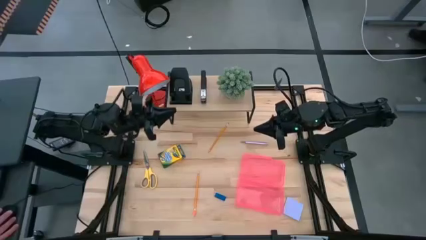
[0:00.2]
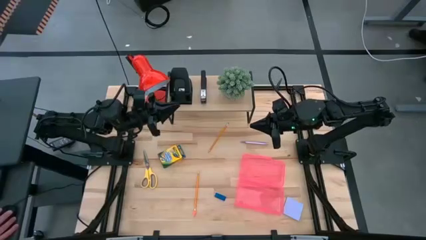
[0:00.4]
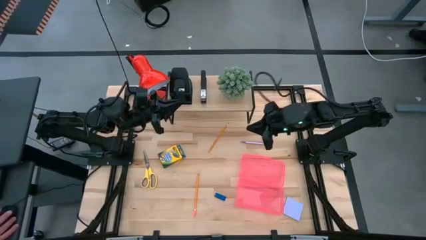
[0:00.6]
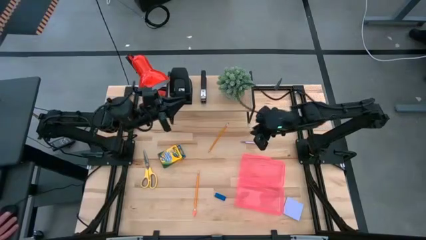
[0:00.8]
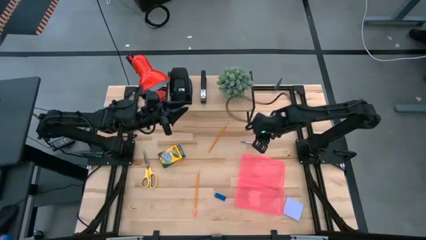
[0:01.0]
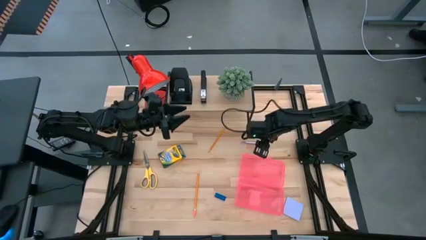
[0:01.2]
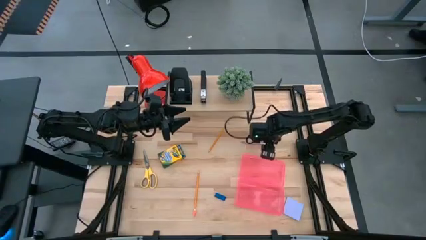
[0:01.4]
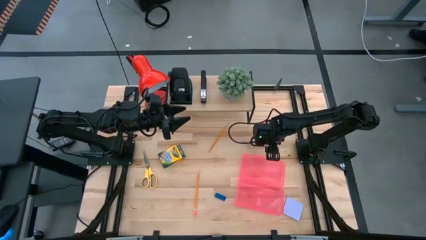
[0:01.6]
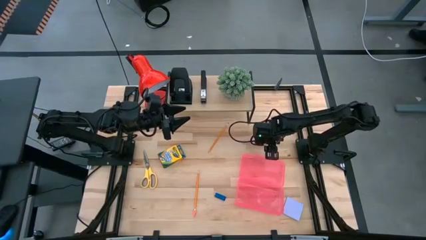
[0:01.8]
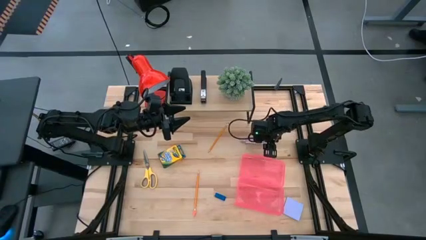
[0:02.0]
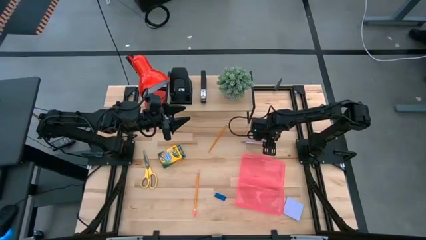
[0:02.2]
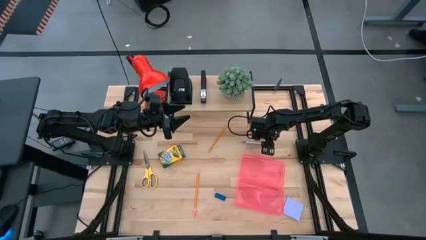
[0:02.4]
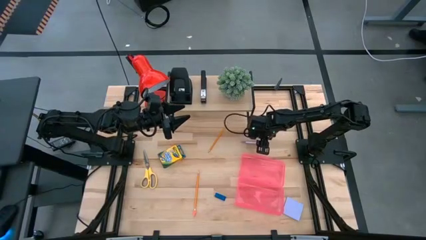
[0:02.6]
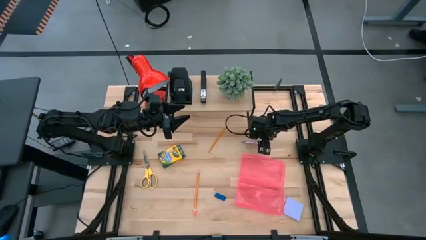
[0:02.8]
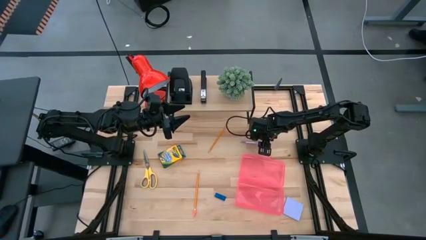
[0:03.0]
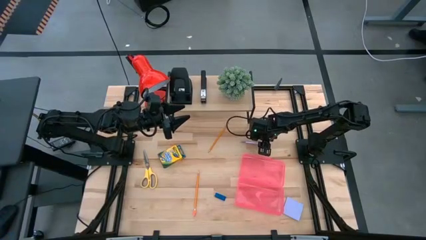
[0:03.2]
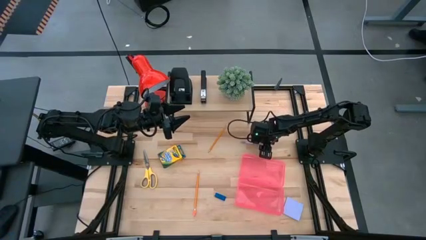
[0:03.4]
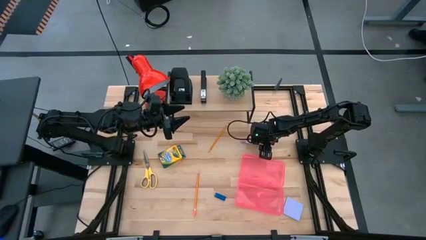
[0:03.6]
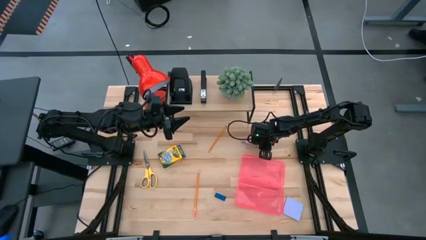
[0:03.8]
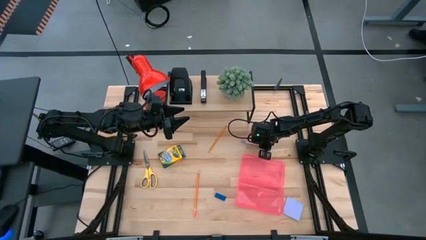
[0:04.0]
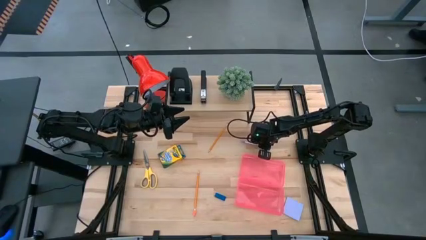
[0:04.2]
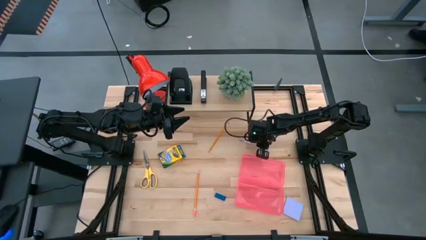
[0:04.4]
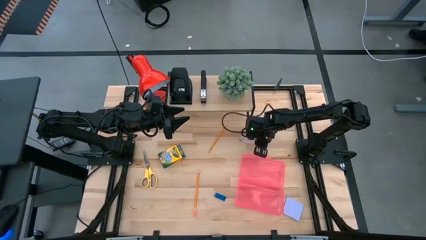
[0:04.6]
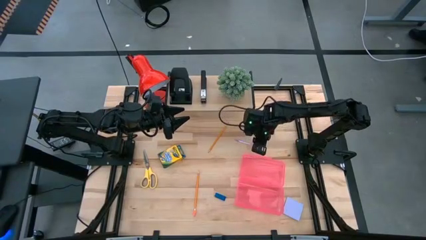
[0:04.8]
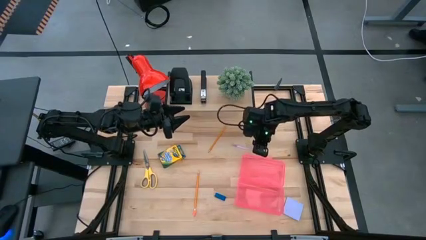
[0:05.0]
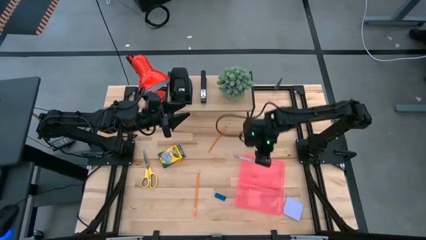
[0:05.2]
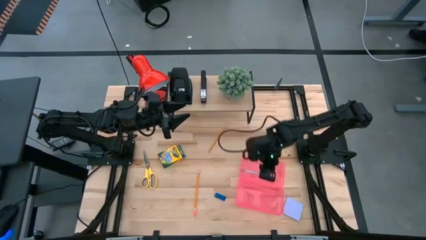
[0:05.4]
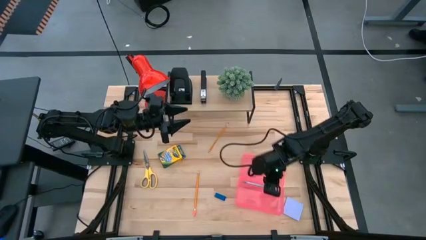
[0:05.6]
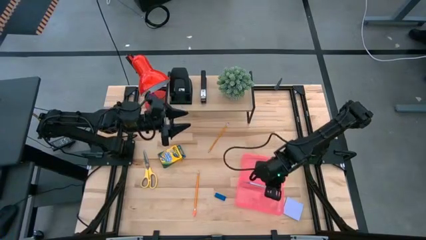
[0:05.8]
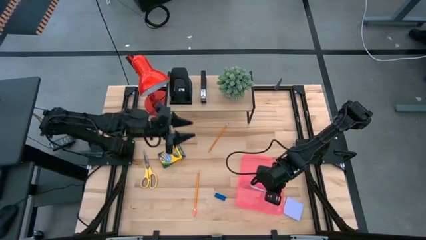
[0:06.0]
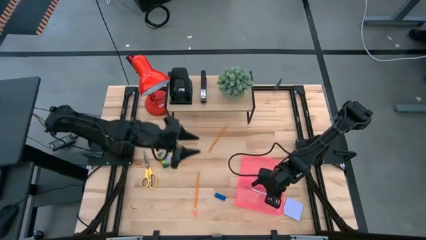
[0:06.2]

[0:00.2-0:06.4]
Task: Pack school essentials
Put the purple pen into the pink supply box

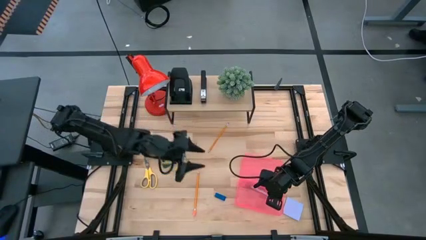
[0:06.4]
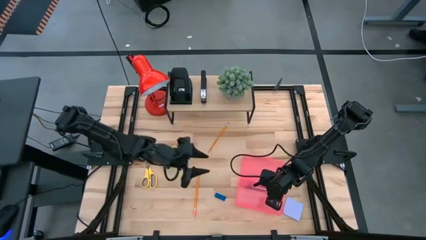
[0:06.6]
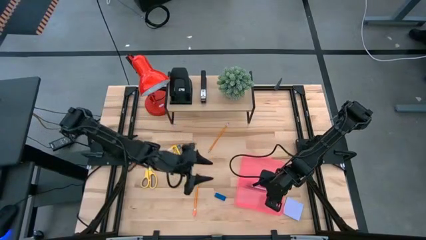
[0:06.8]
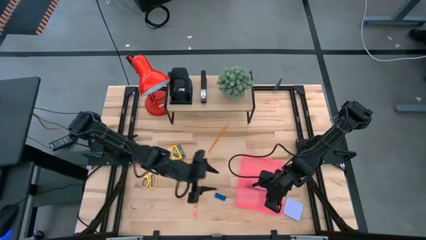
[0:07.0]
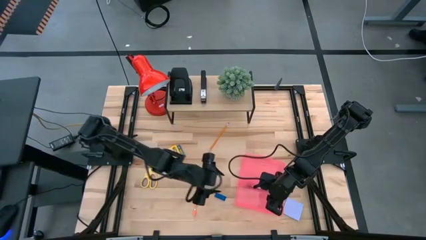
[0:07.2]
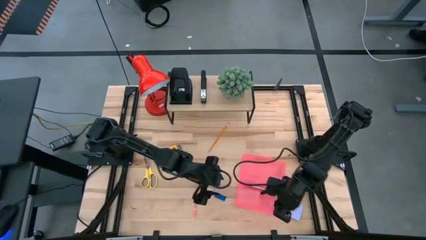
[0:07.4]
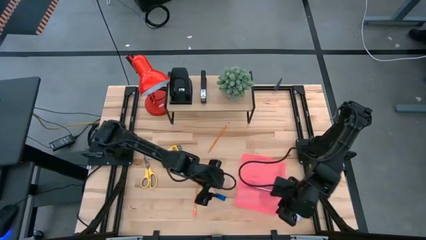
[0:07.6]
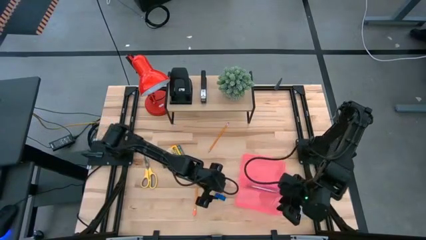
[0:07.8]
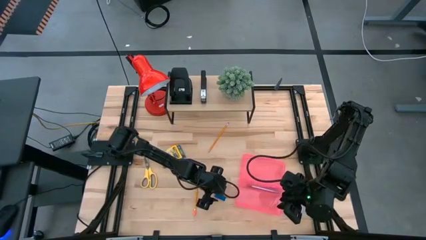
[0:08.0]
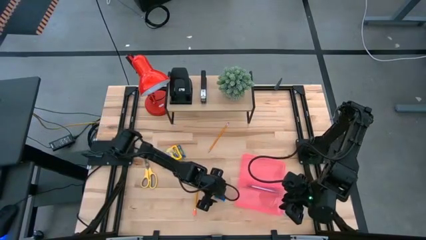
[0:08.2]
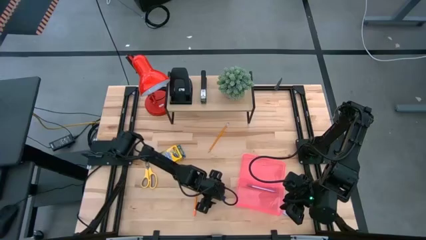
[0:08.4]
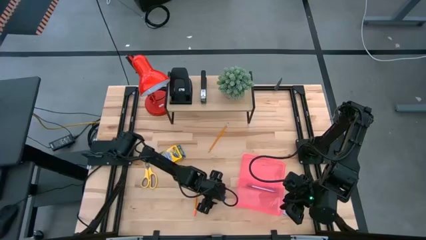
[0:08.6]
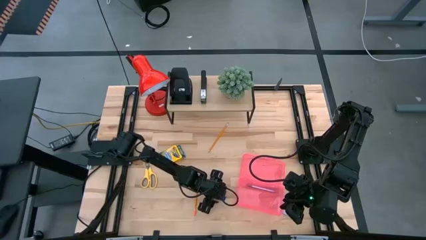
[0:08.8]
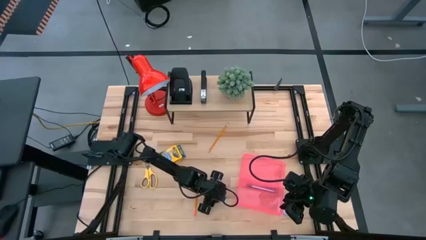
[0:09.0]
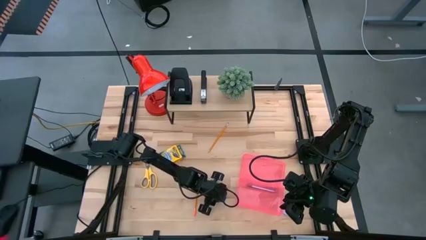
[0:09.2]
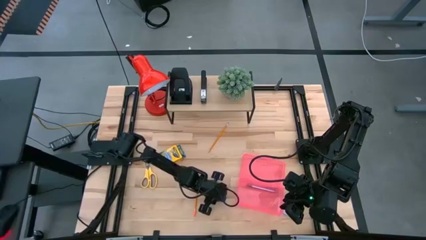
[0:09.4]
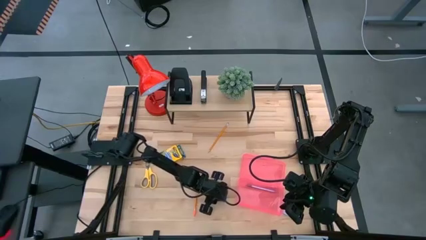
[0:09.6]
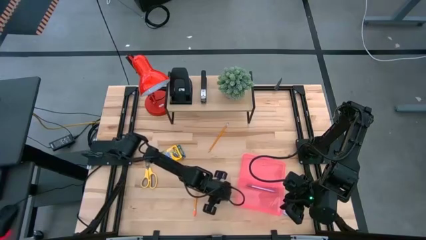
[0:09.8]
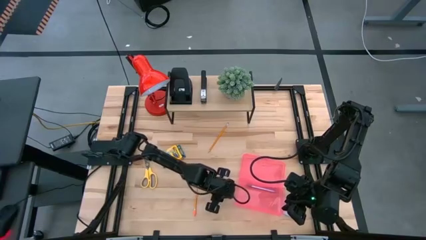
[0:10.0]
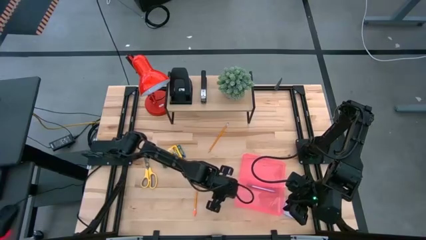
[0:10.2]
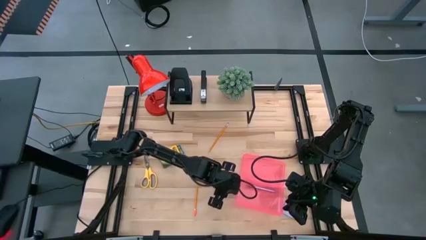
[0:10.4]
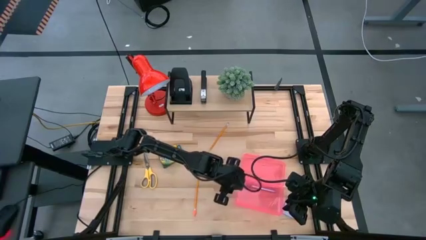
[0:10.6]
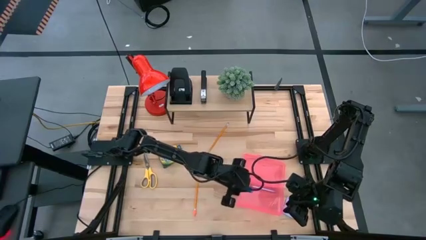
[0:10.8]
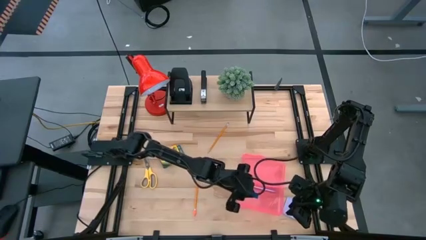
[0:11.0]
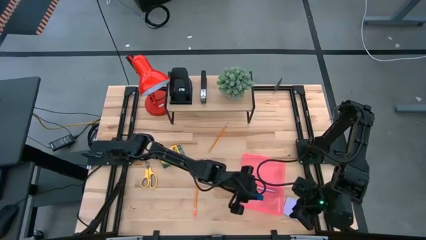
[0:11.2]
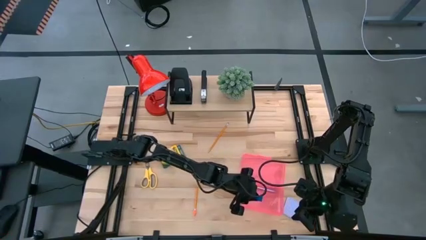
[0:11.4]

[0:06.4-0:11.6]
Put the blue eraser into the pink supply box

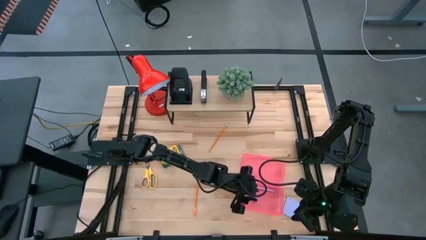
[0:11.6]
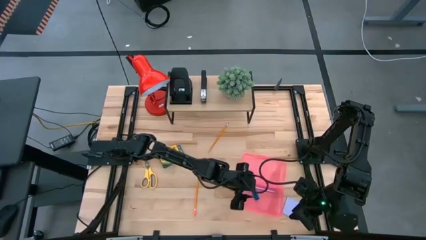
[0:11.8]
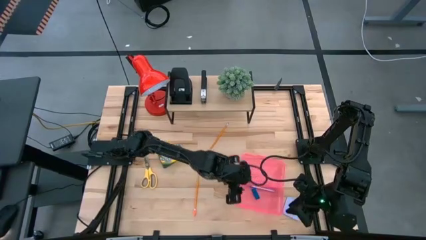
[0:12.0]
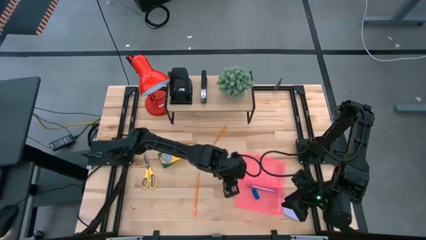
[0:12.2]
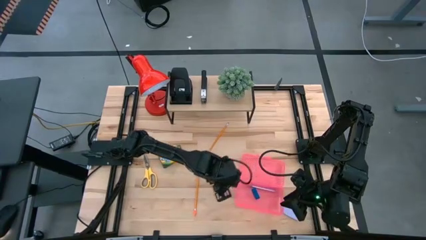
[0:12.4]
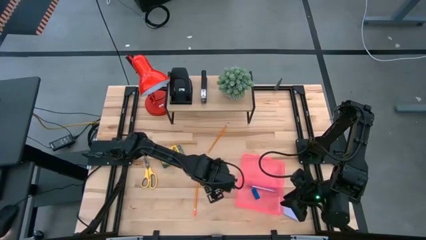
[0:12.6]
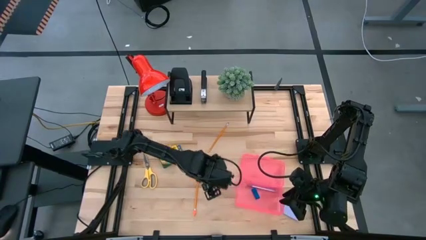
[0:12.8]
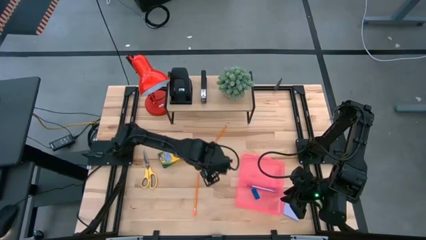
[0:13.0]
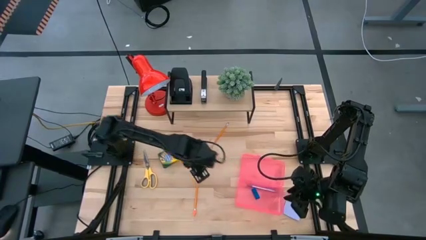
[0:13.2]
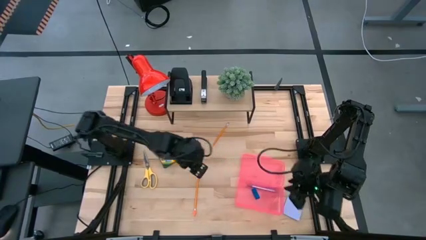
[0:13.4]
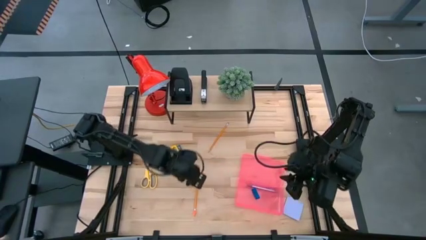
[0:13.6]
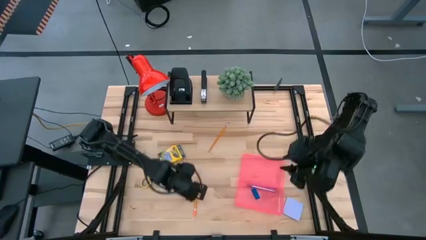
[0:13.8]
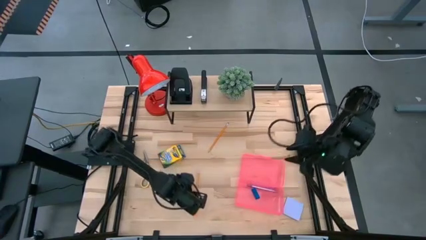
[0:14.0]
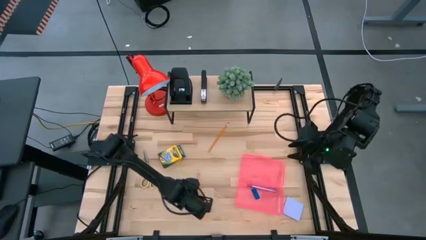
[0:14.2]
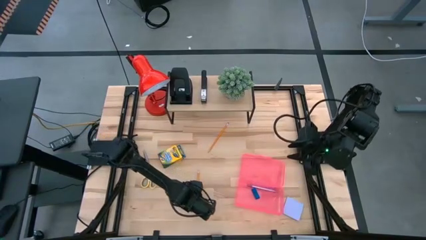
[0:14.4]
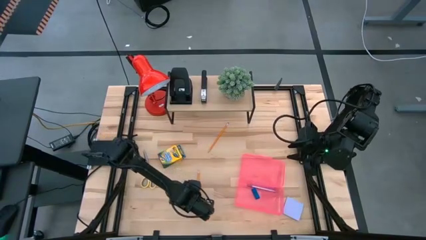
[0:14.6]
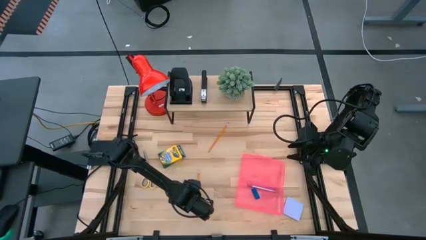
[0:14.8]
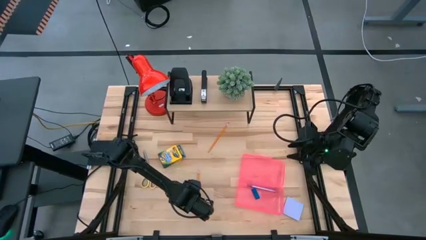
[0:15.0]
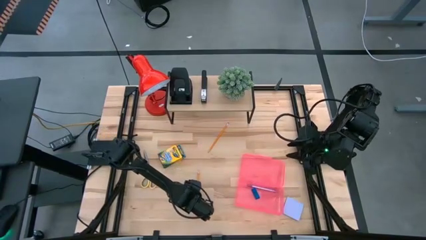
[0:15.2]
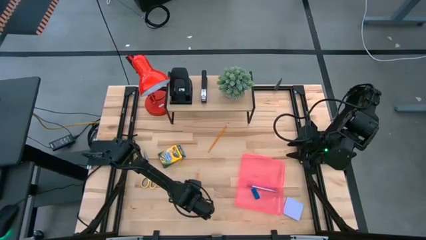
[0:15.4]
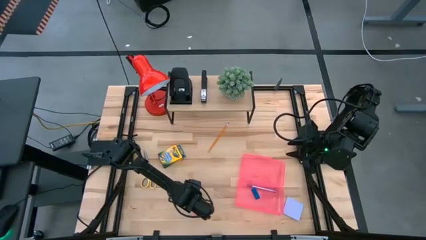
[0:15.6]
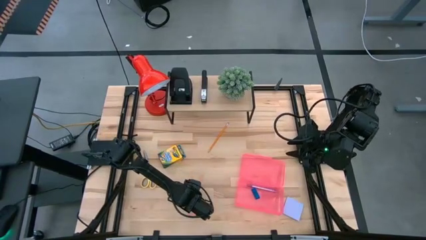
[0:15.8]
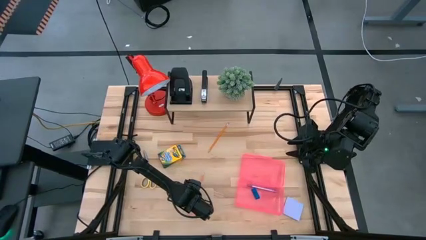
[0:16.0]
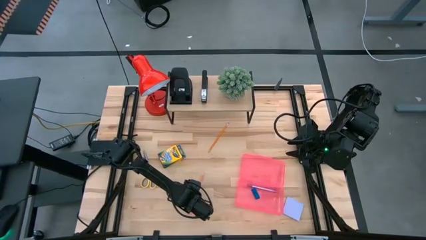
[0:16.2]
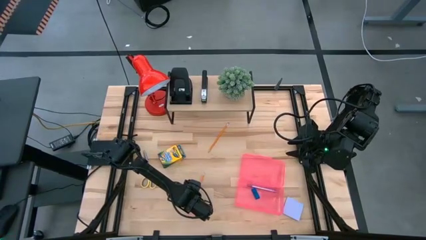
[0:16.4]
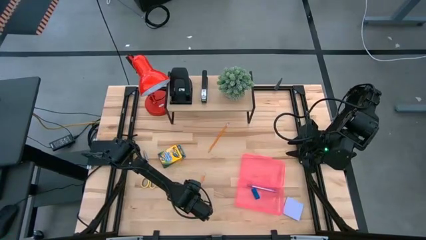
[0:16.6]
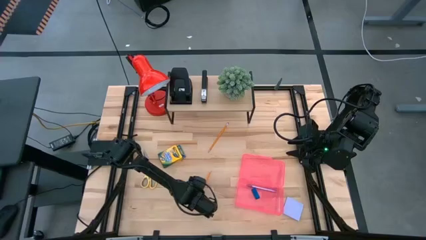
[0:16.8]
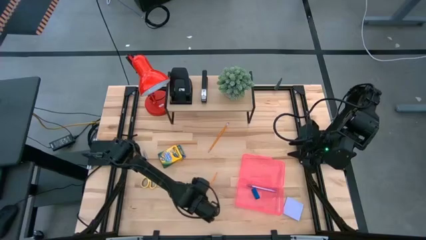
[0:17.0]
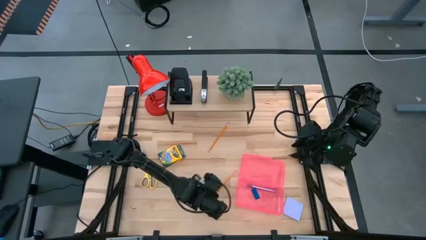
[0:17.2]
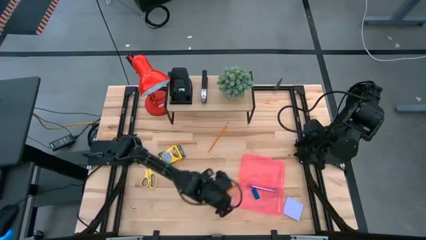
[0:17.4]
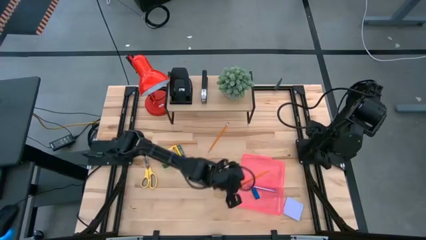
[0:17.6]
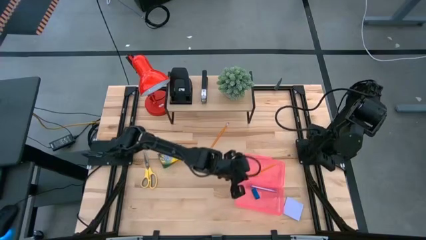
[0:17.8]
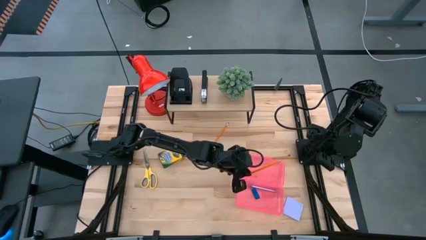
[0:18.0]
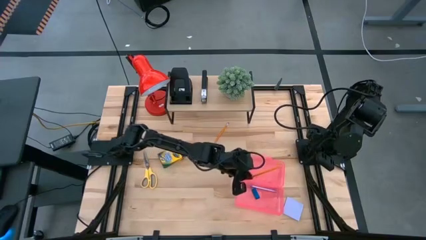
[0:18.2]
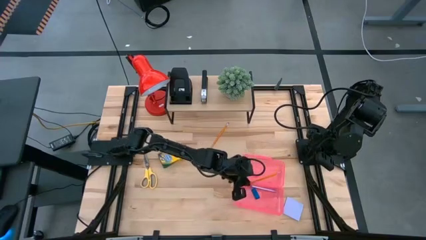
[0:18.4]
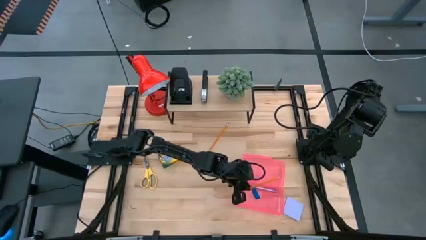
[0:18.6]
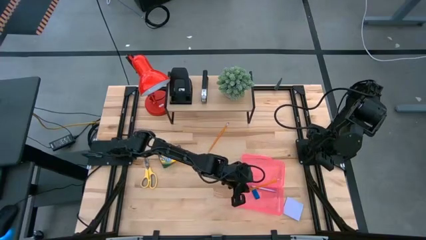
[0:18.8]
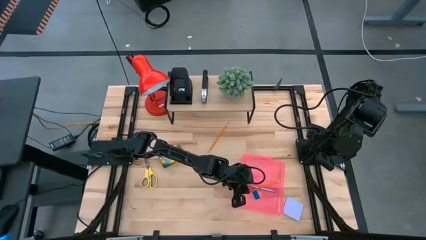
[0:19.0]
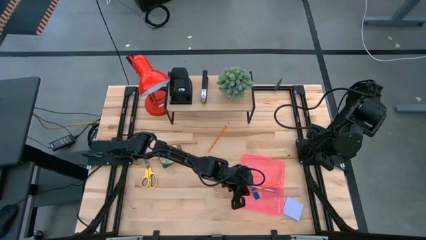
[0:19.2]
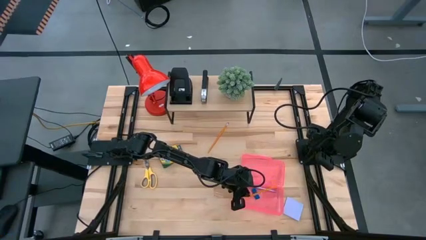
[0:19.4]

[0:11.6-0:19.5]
Put the bottom orange pencil into the pink supply box
